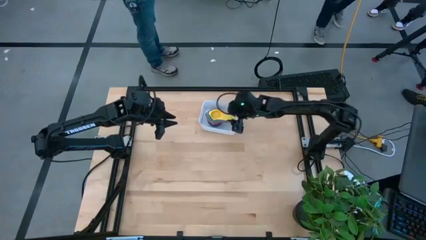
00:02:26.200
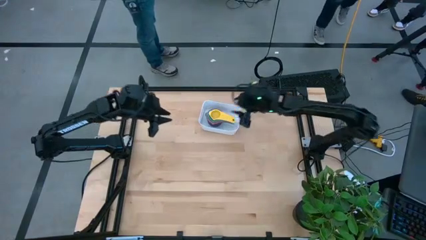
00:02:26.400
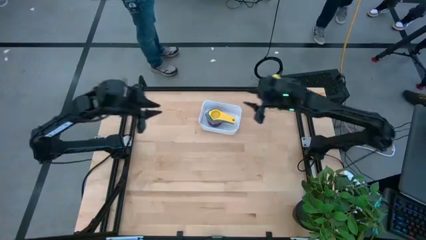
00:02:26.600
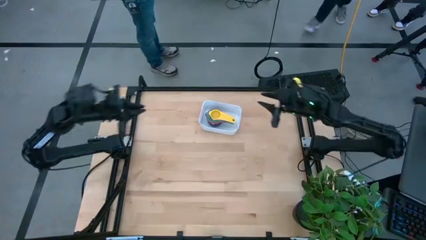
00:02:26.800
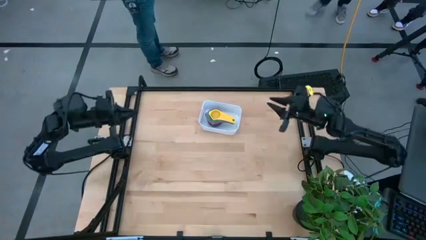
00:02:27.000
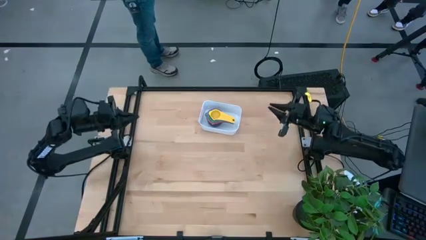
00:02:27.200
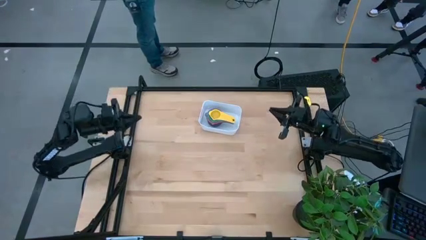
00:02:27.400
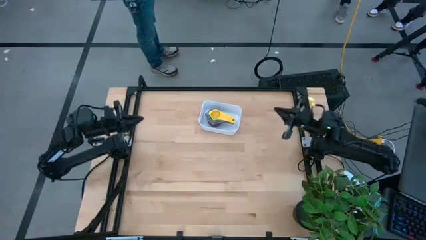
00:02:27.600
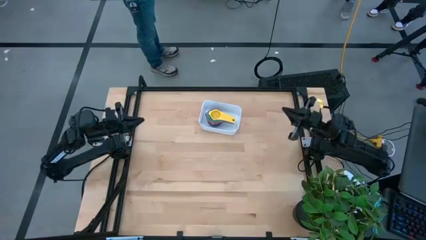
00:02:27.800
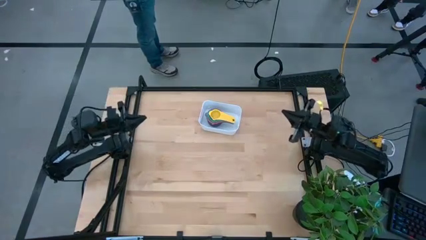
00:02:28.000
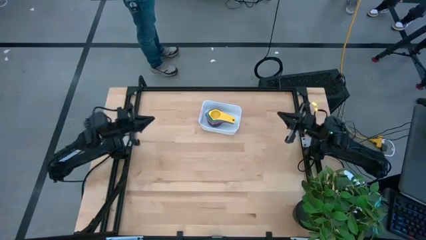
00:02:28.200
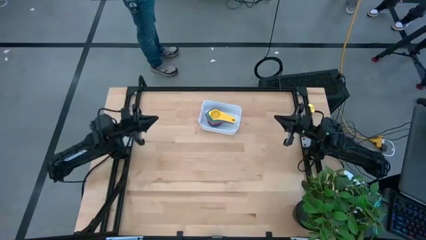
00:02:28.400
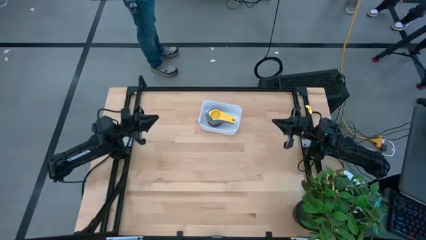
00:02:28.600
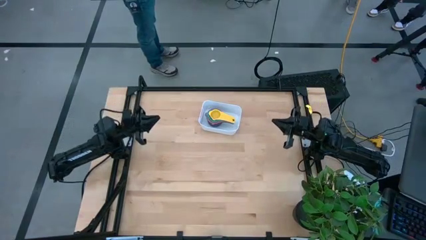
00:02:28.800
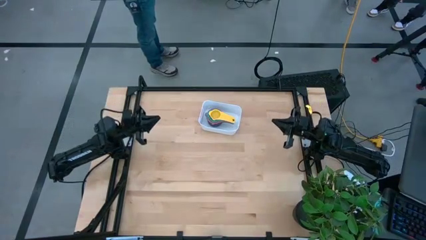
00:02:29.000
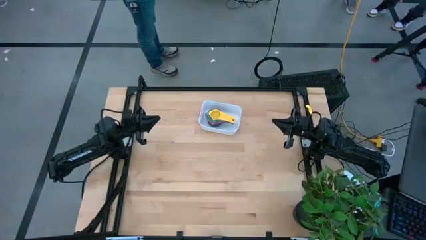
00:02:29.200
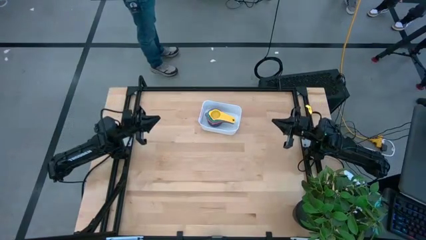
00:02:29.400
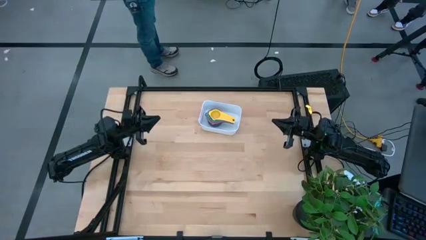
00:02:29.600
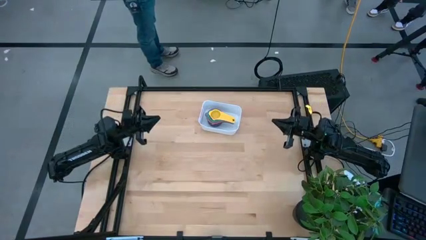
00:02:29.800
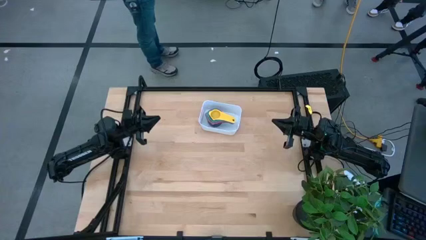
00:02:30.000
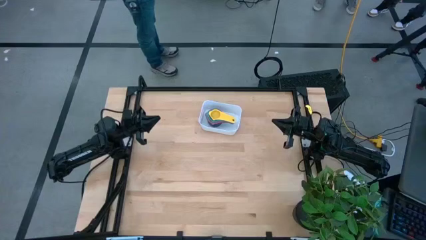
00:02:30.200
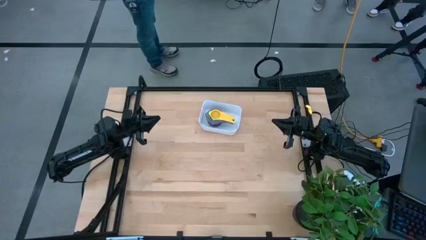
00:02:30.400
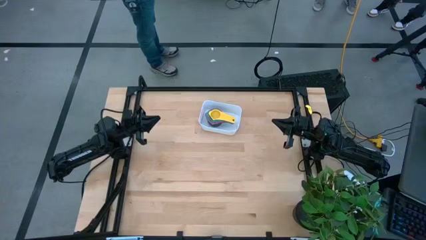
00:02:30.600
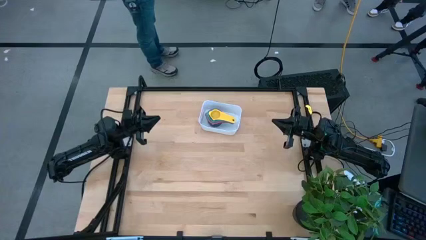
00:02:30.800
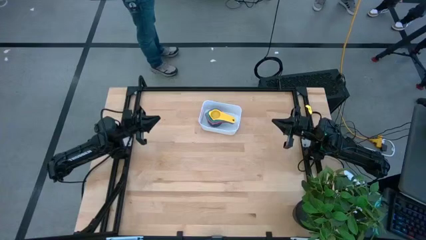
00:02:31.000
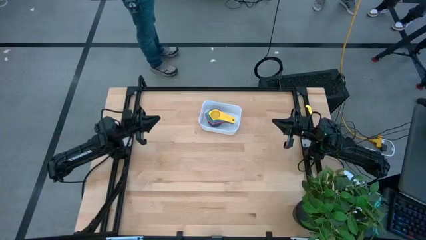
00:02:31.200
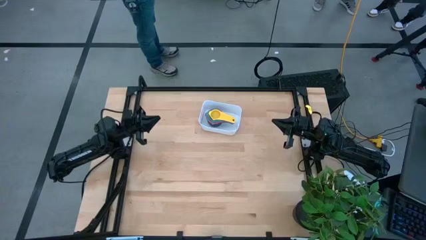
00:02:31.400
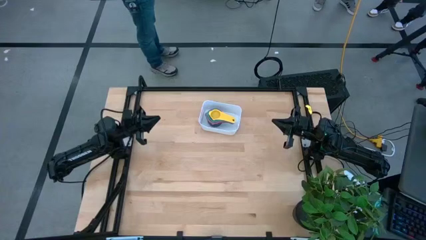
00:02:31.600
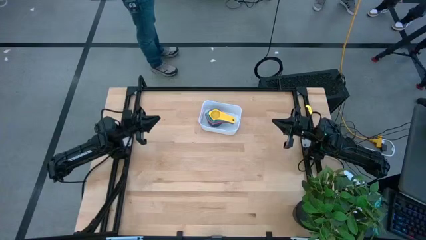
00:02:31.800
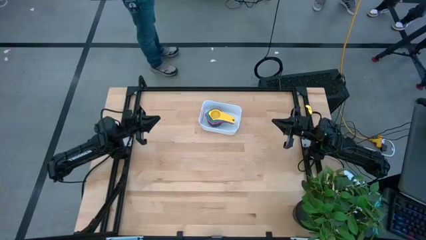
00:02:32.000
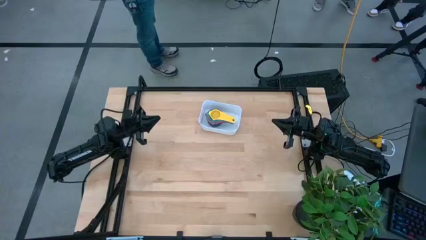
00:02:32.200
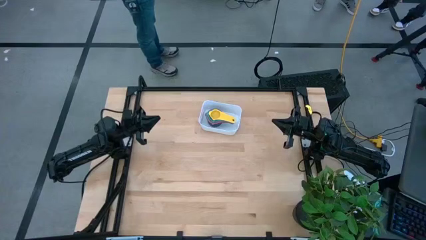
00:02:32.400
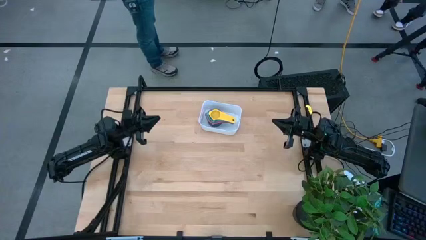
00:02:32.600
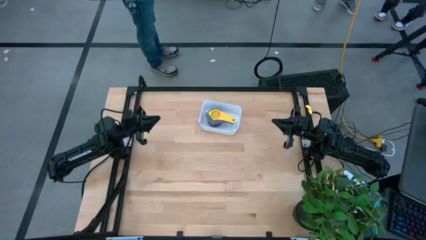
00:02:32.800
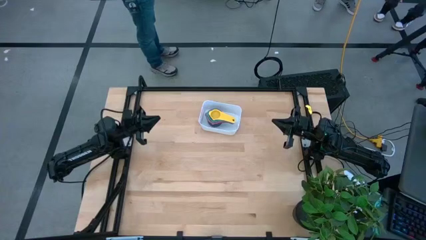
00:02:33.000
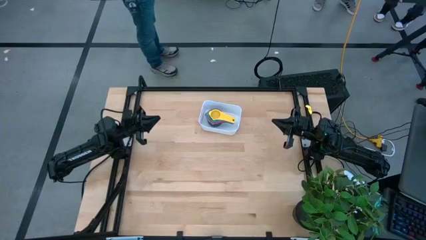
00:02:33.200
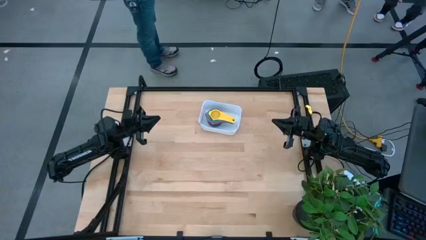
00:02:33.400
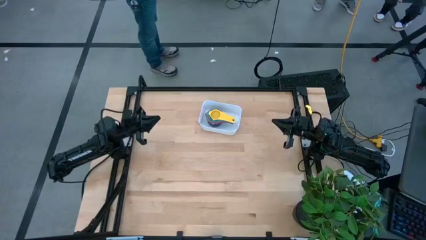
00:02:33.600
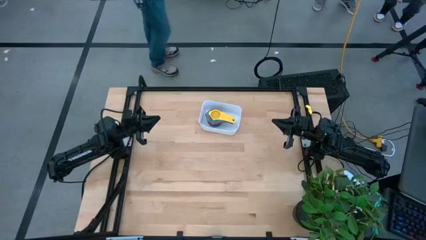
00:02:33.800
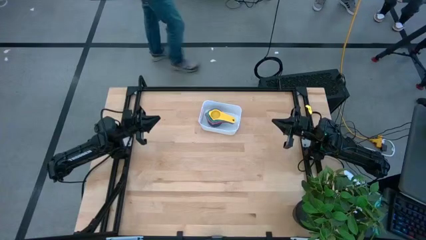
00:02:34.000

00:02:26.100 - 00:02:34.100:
Task: Nest measuring cups in basket
Return to Home Position

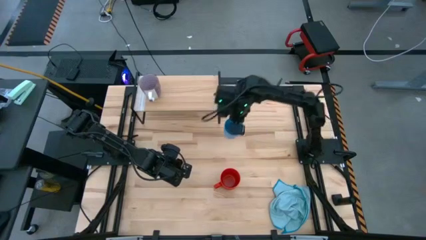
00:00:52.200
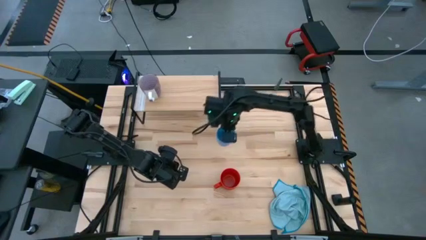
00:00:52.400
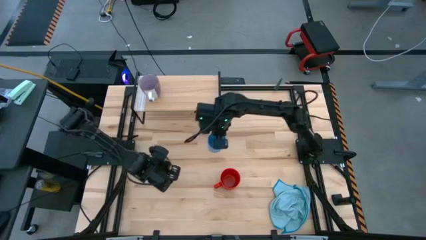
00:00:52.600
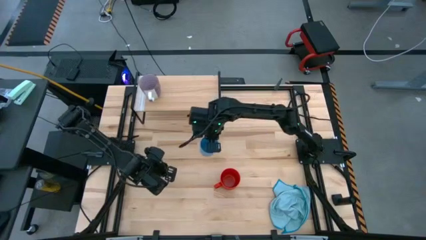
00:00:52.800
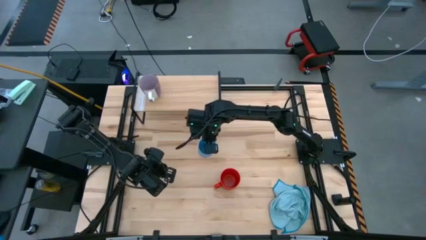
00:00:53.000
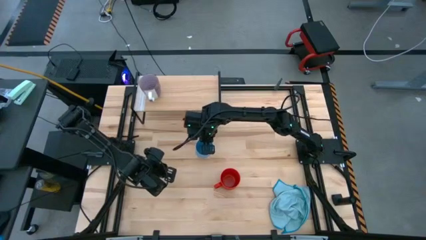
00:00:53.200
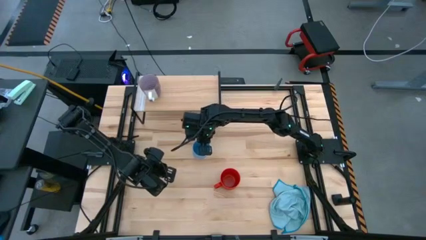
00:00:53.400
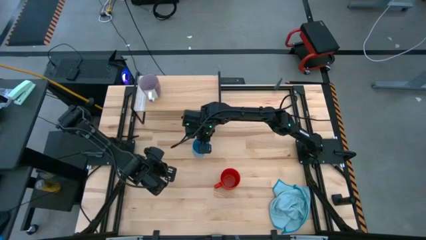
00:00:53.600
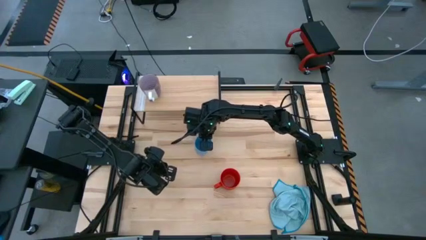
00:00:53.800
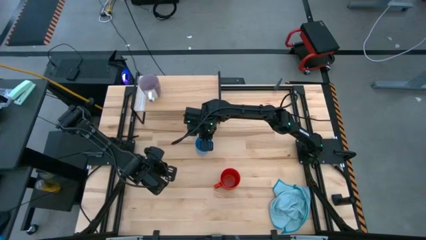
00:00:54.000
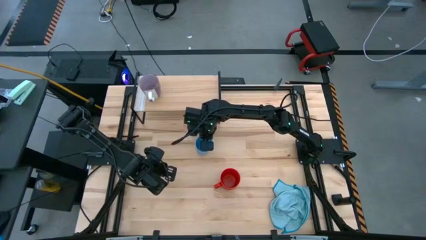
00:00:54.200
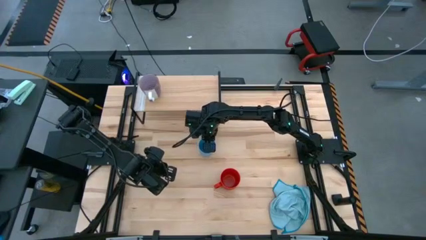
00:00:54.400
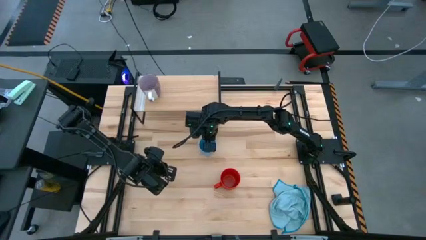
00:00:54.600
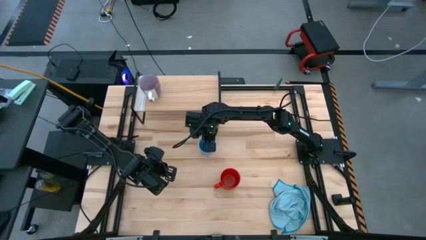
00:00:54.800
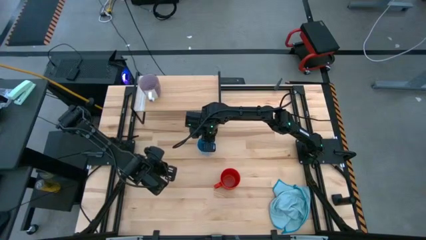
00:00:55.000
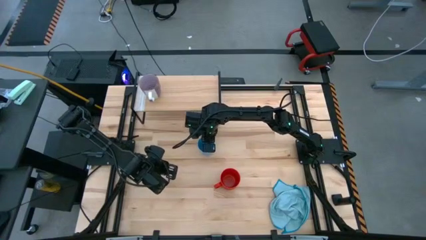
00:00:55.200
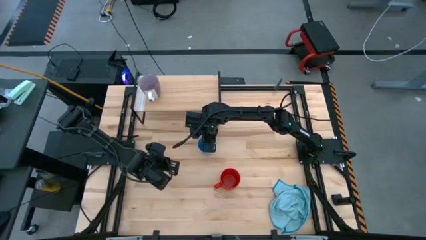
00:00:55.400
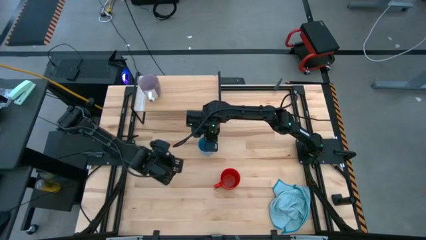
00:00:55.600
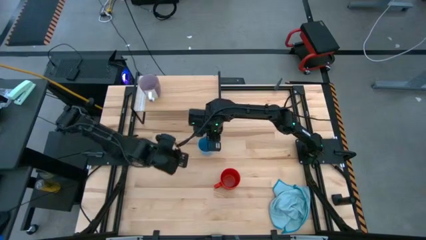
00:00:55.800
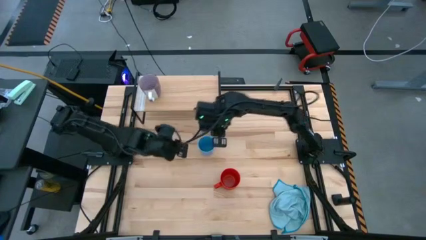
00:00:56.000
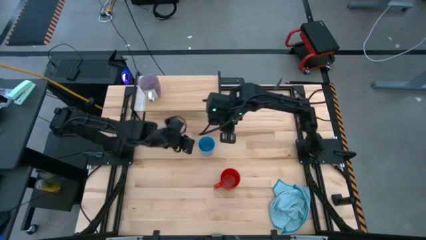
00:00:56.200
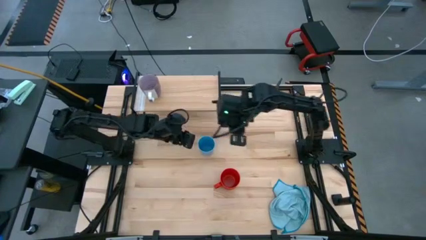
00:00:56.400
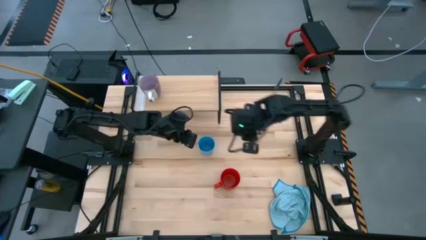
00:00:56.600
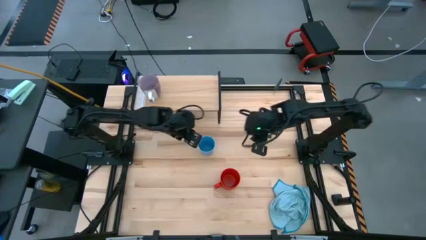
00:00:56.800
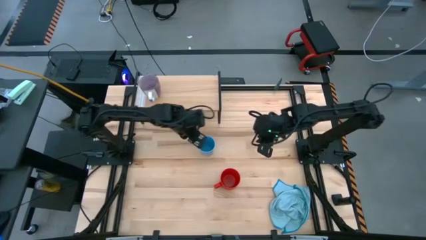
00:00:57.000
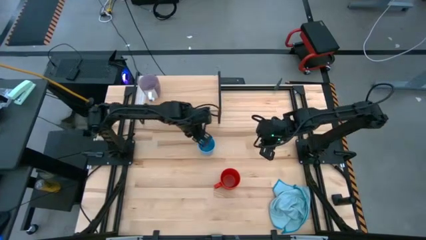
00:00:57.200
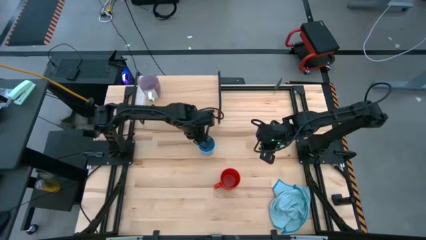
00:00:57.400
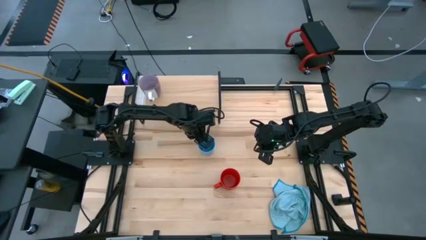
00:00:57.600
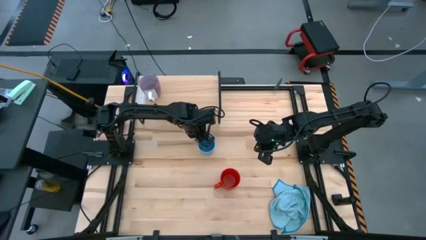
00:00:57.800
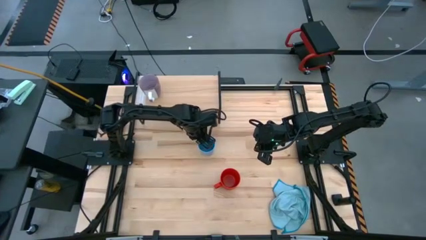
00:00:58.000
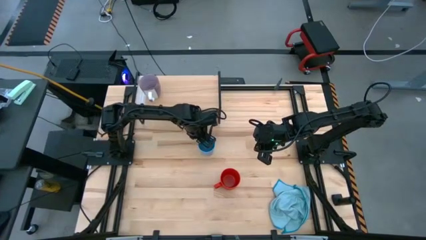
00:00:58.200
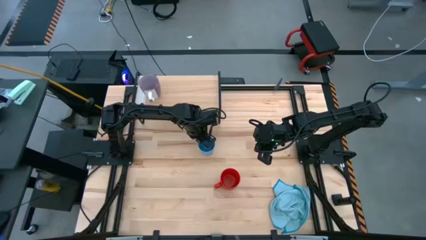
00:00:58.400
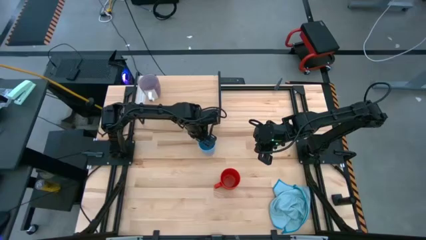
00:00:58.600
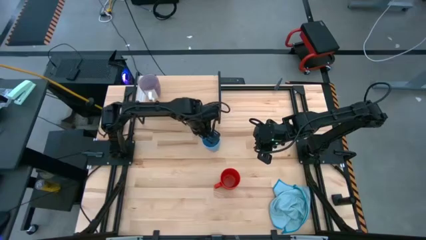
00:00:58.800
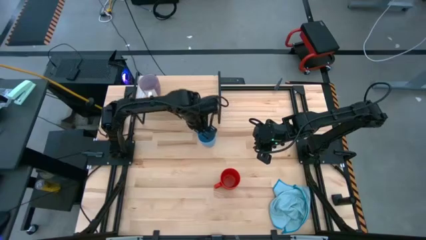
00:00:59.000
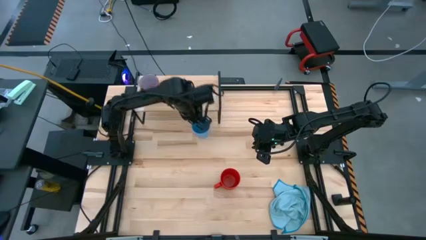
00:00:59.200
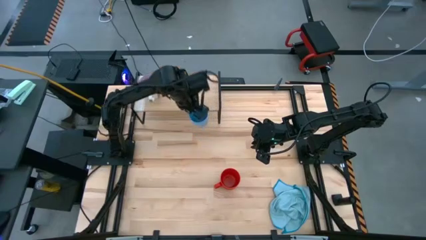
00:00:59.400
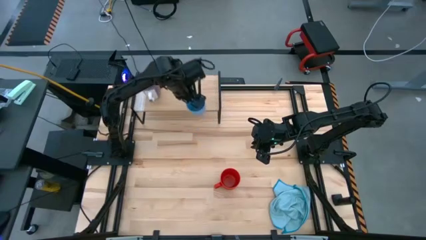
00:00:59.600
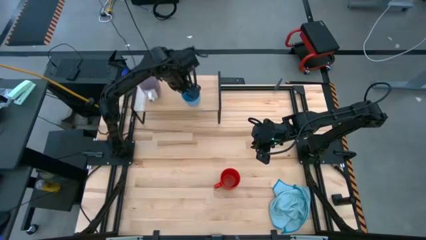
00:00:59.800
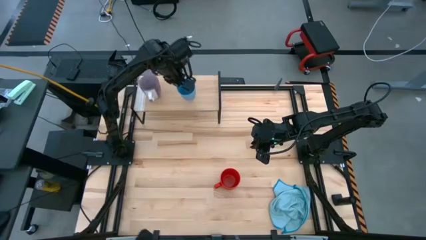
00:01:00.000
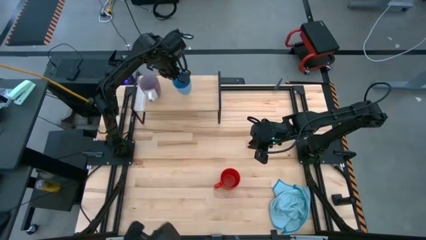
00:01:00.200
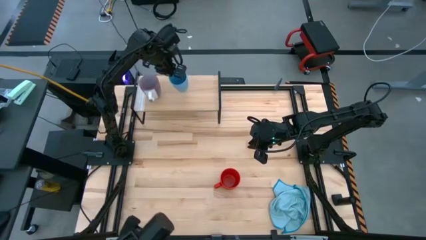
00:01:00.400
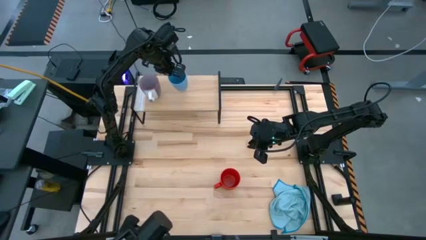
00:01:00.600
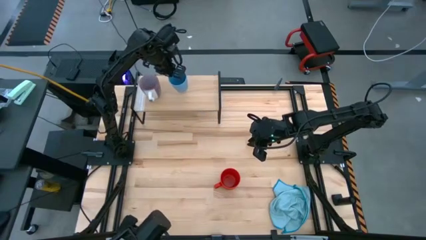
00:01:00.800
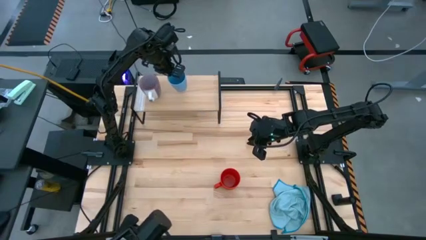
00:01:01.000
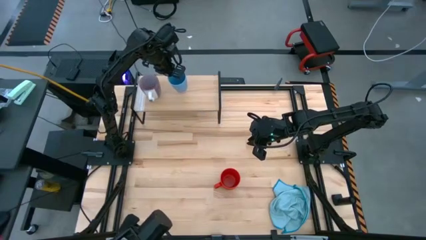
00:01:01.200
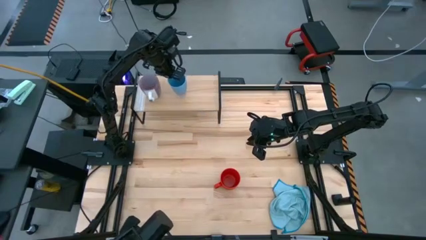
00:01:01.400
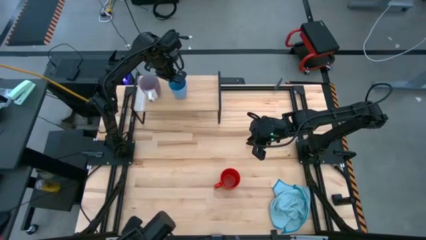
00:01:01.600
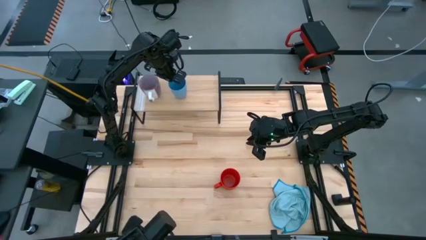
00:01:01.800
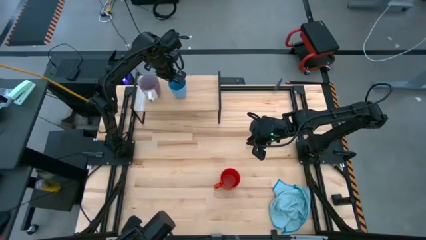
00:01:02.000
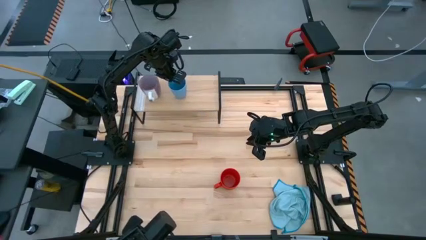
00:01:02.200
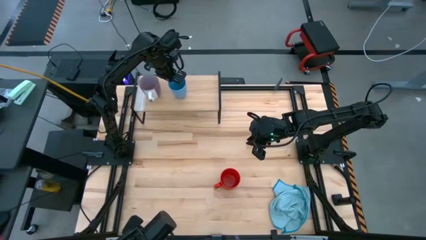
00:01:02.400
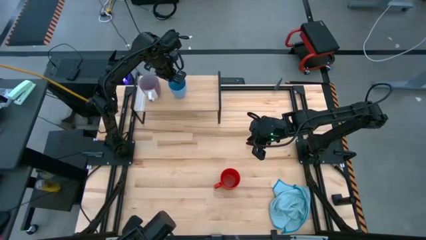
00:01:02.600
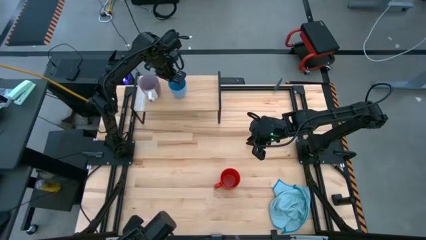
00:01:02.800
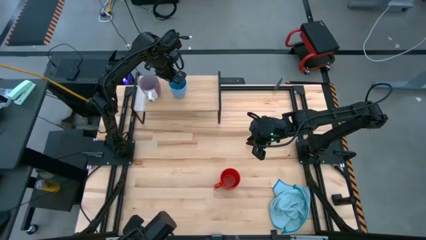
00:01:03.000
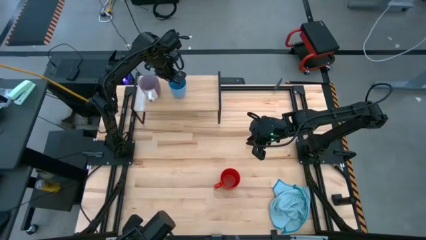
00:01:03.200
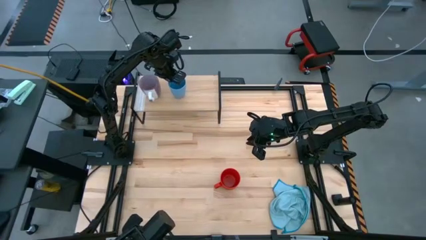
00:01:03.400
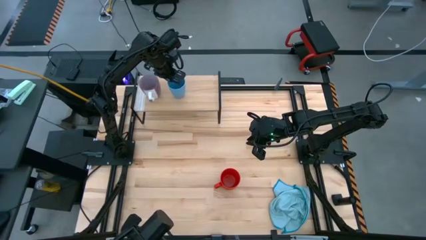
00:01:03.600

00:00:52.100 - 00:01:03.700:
Task: Stack small to large cups/mugs on shelf
Put the blue cup on the shelf
